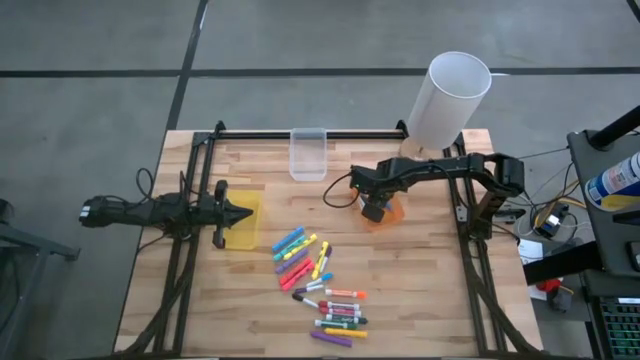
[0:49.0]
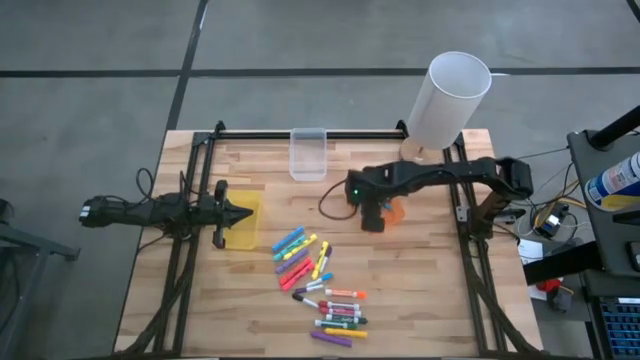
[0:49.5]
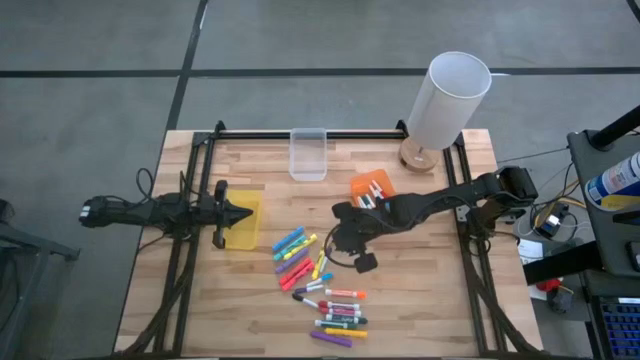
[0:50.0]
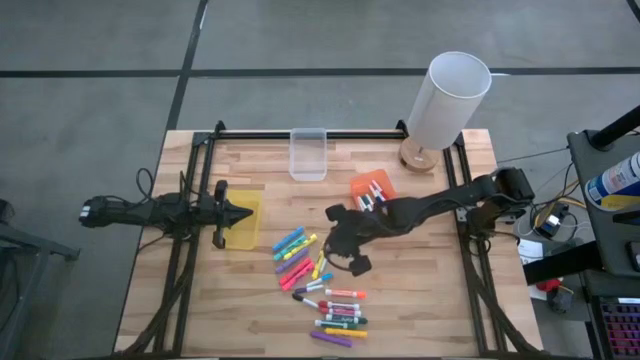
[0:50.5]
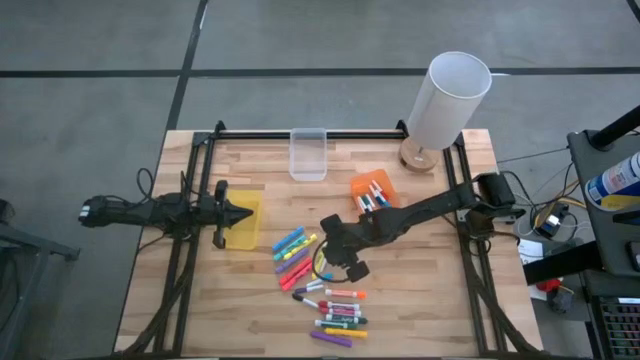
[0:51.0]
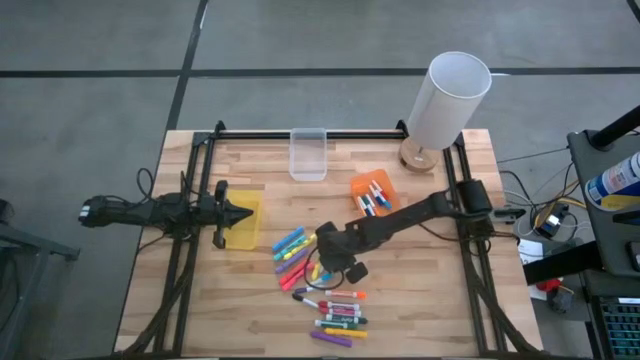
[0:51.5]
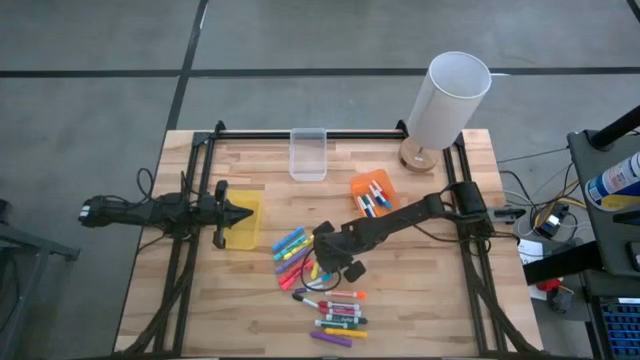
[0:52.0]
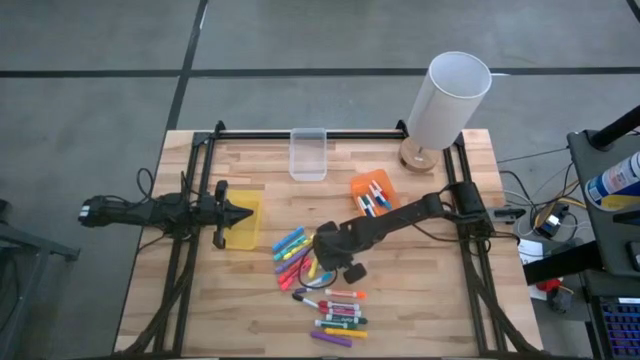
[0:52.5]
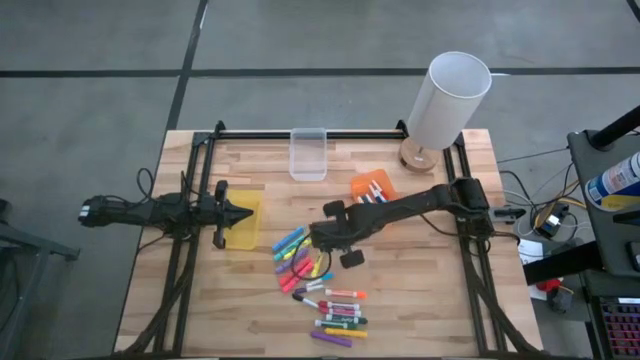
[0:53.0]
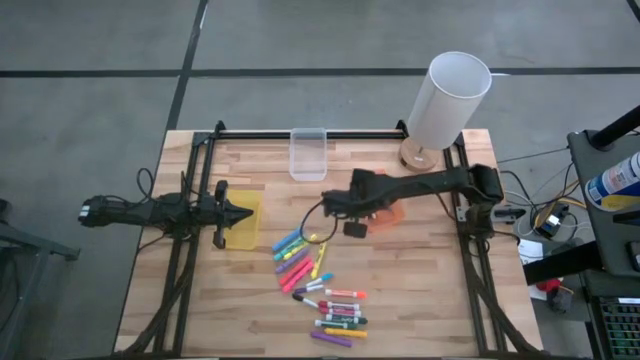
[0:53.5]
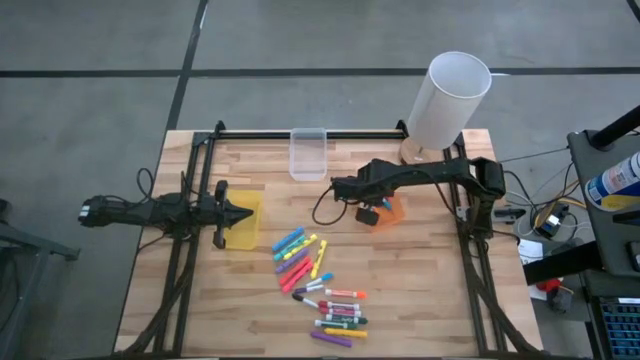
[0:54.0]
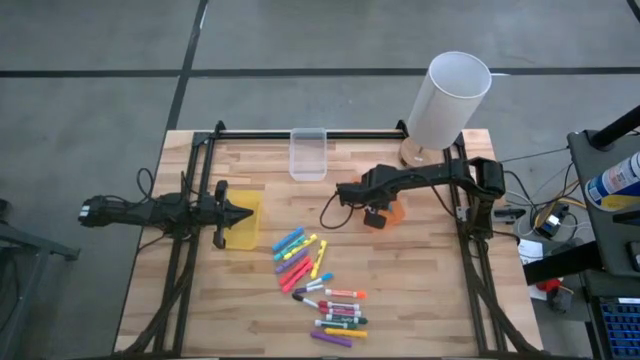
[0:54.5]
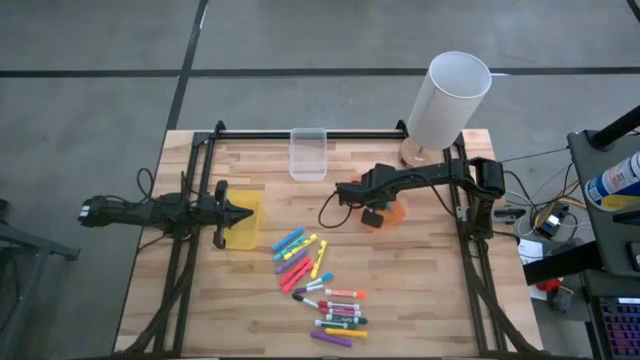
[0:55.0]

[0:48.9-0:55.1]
Task: Pick & Place Markers
Put the top small violet marker into the orange bin

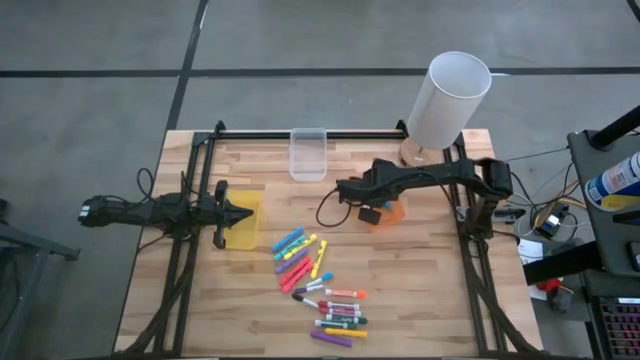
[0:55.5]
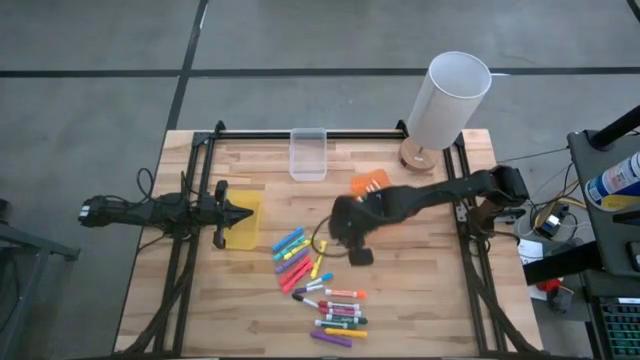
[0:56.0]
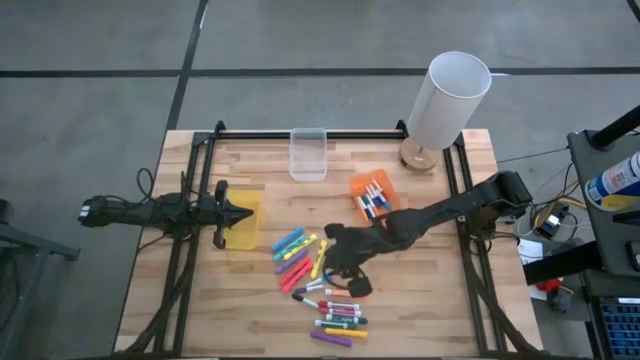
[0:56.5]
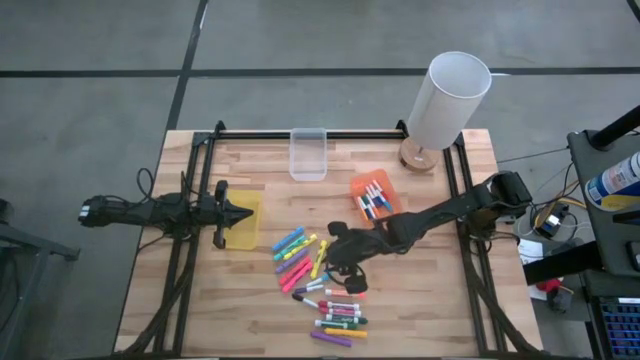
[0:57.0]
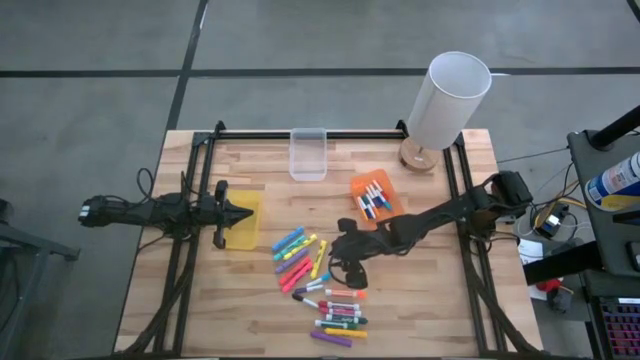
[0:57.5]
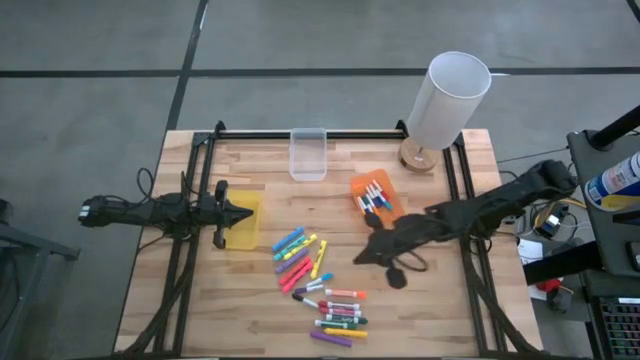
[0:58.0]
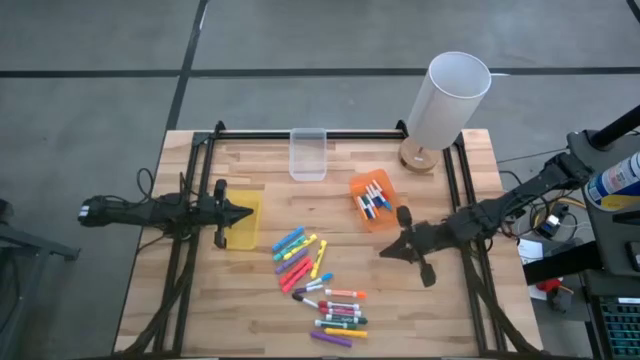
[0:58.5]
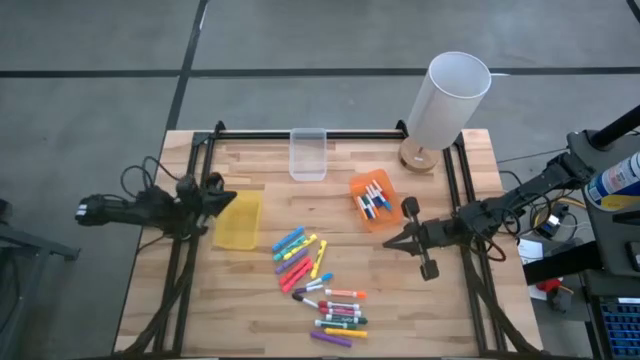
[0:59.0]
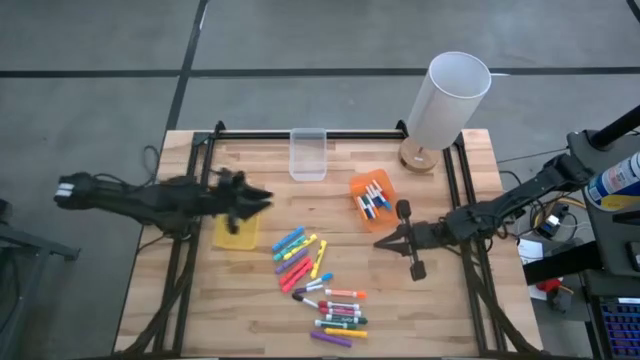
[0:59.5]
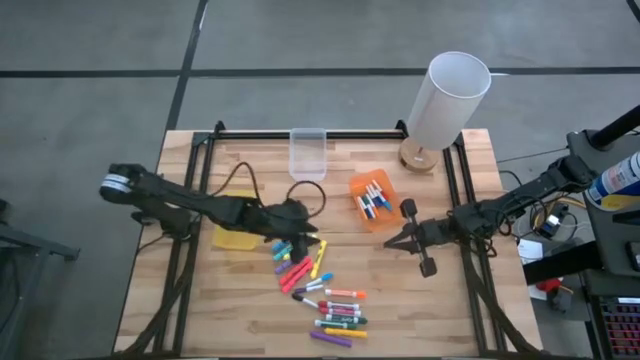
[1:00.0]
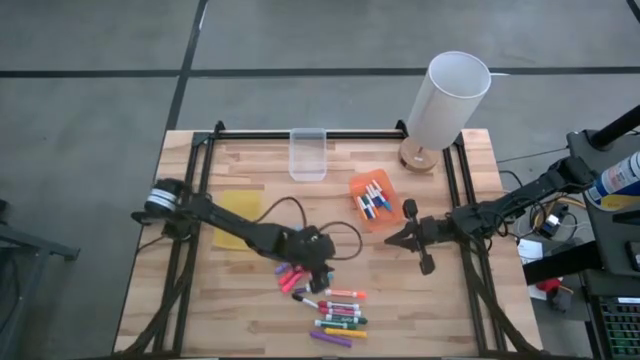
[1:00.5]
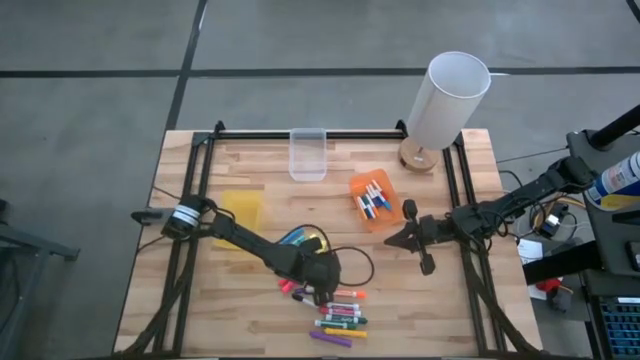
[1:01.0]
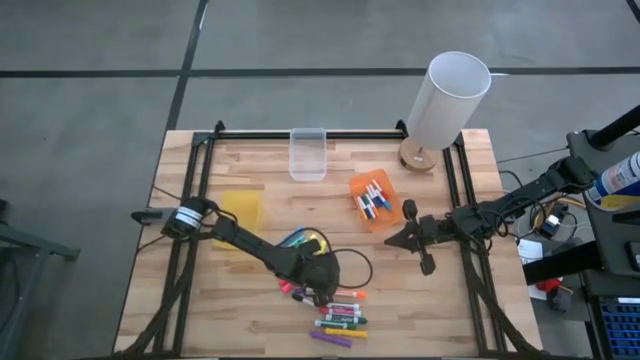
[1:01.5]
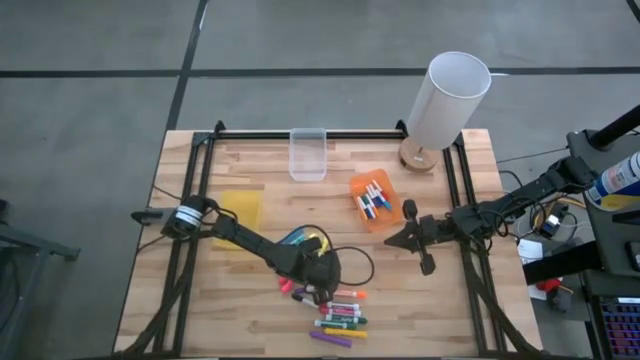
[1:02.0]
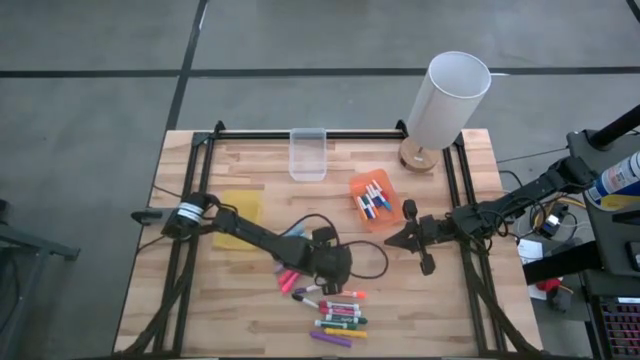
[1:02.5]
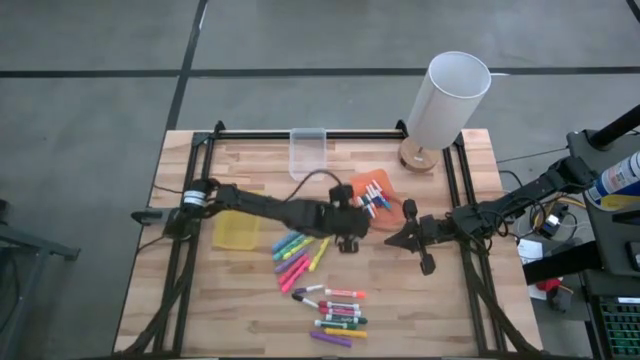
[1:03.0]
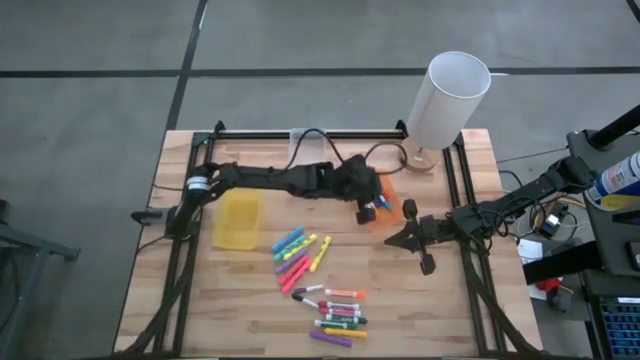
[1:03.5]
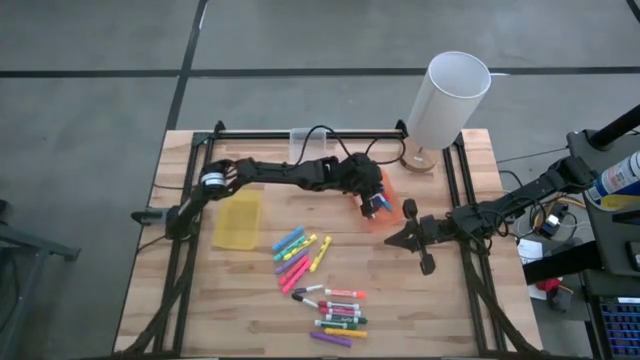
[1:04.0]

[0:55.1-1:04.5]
Put the small light blue marker into the orange bin

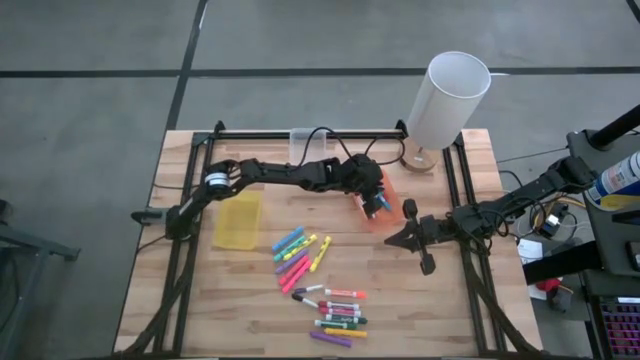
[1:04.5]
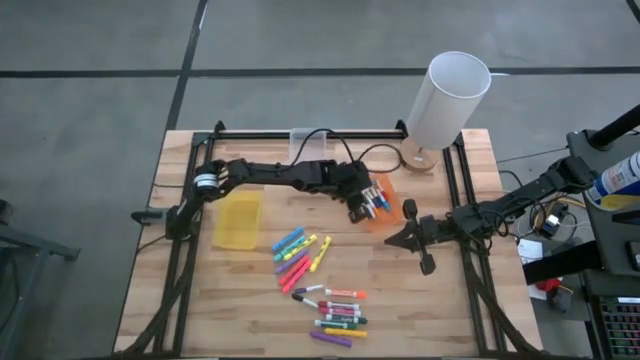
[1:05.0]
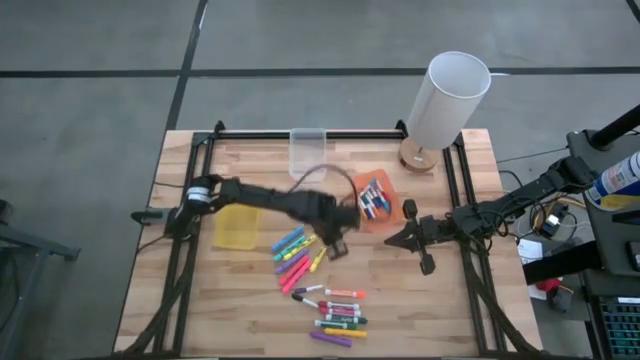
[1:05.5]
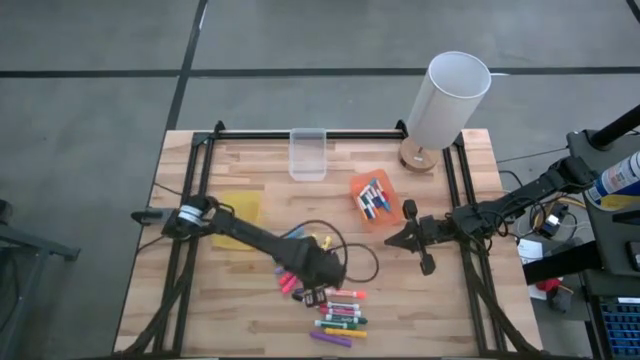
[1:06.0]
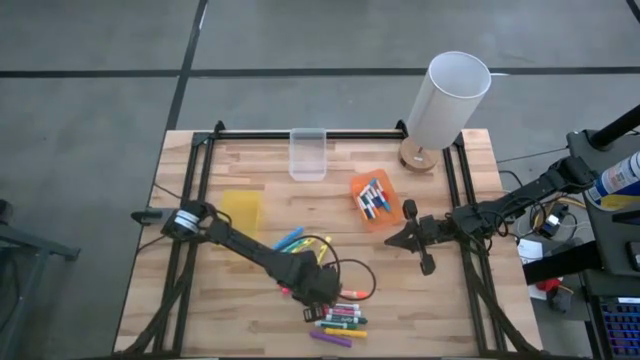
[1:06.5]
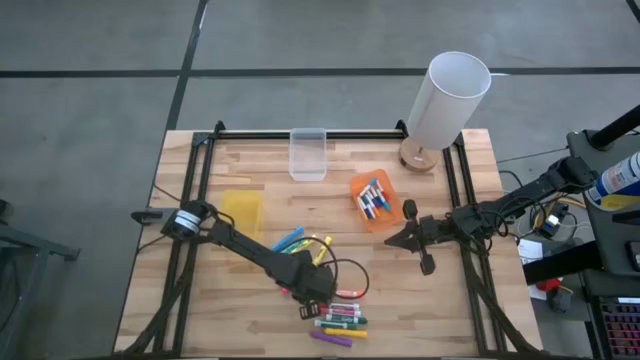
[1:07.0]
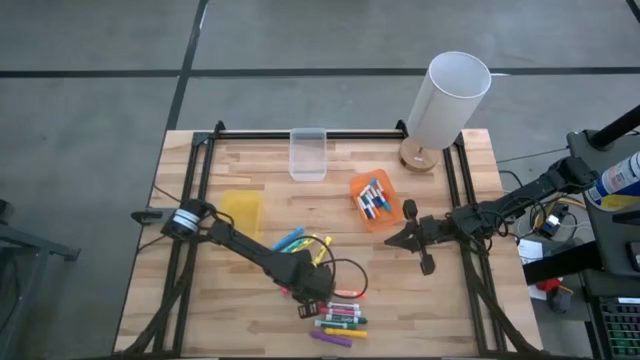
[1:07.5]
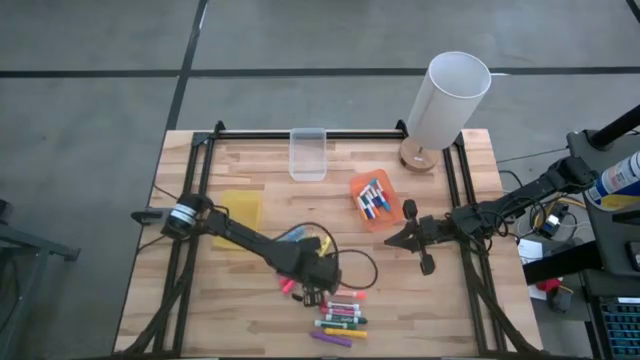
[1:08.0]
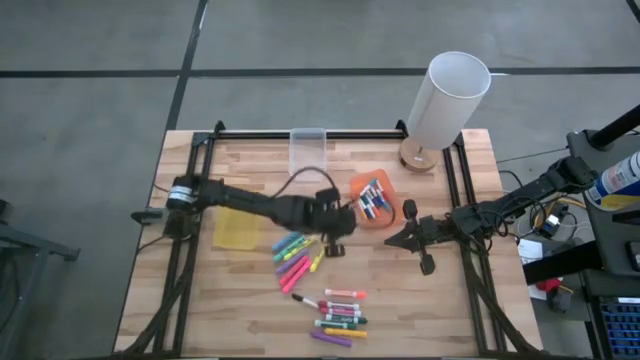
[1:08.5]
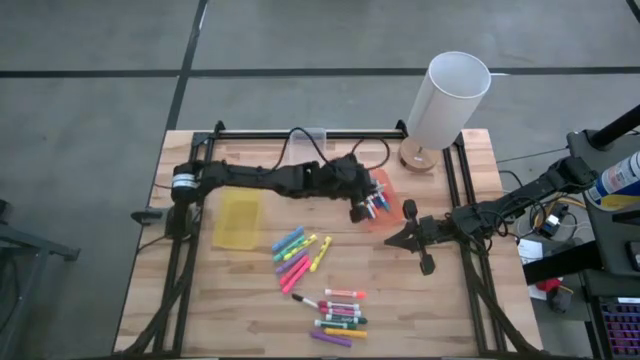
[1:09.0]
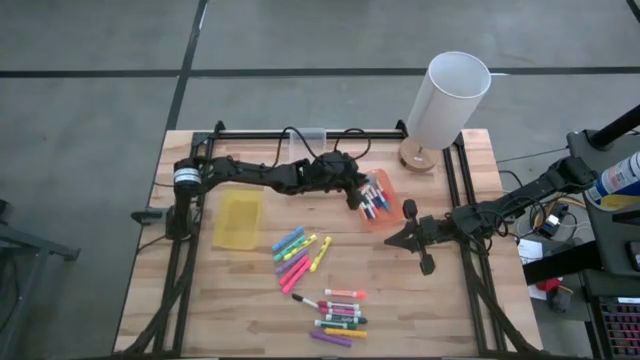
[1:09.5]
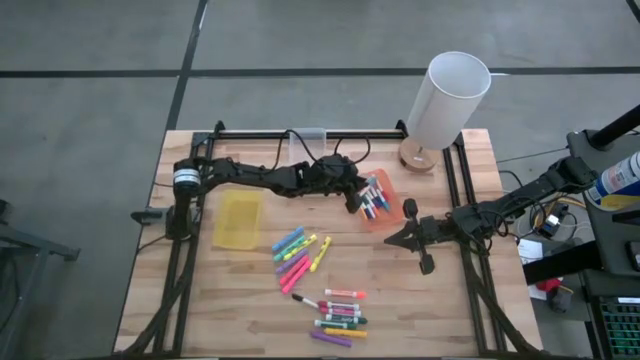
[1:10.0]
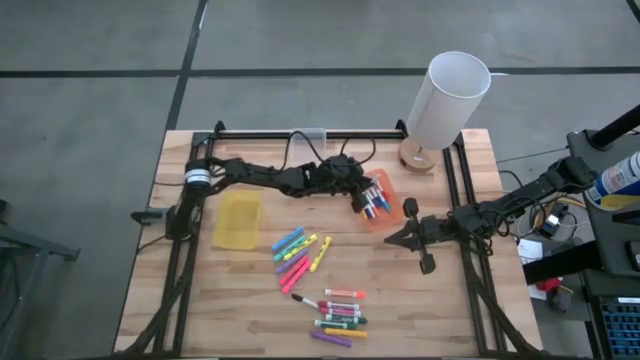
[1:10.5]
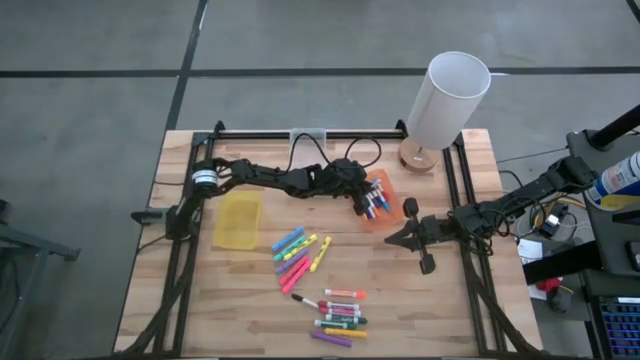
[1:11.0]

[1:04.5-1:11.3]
Put the small violet marker into the orange bin
